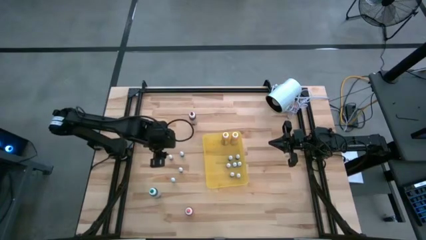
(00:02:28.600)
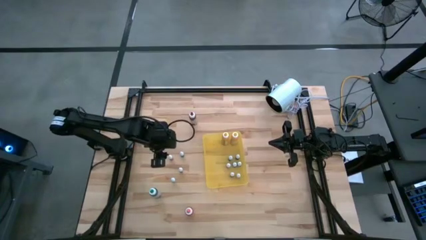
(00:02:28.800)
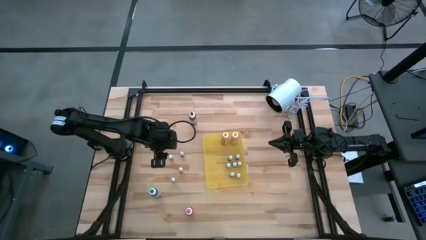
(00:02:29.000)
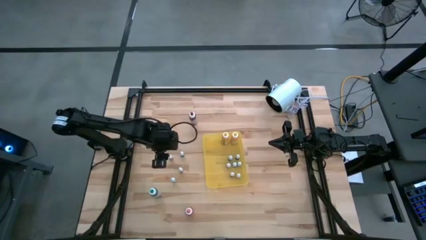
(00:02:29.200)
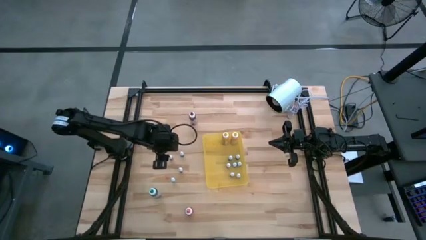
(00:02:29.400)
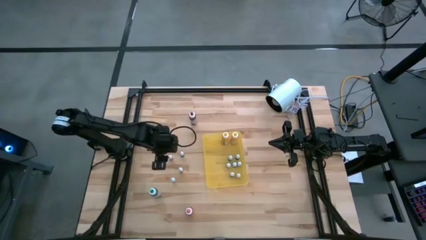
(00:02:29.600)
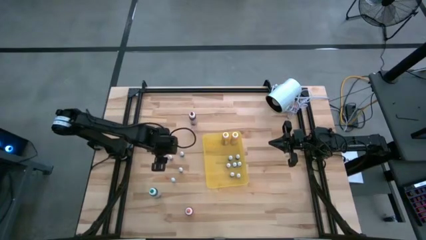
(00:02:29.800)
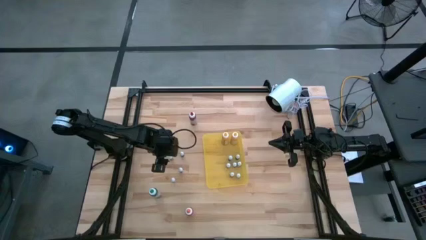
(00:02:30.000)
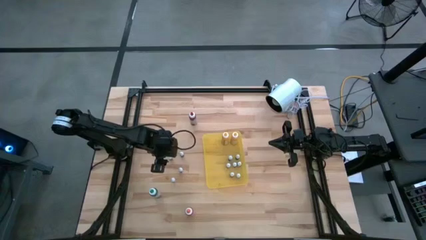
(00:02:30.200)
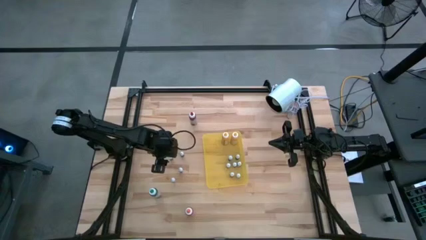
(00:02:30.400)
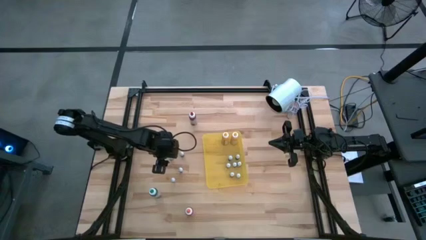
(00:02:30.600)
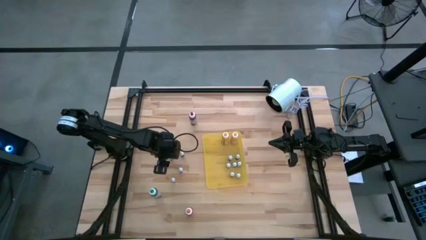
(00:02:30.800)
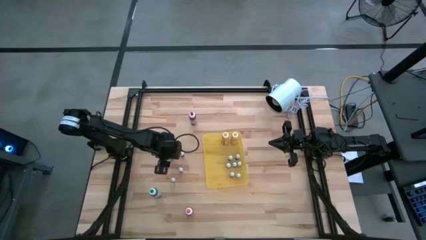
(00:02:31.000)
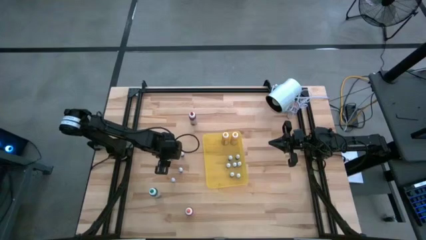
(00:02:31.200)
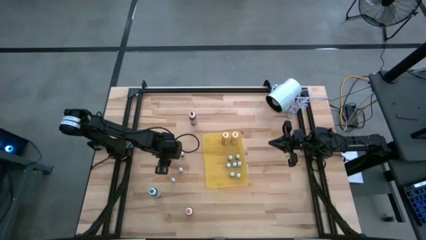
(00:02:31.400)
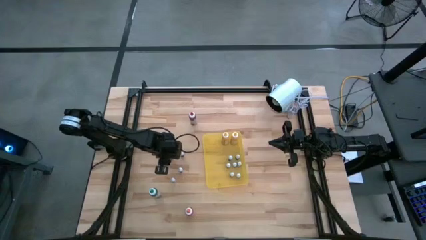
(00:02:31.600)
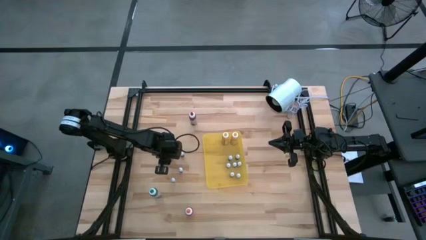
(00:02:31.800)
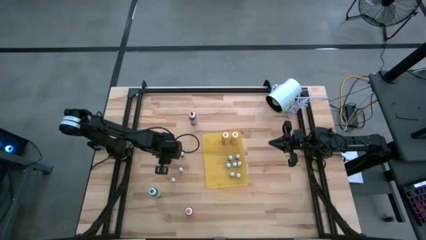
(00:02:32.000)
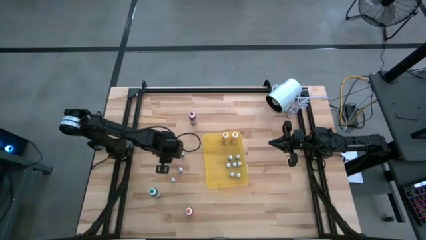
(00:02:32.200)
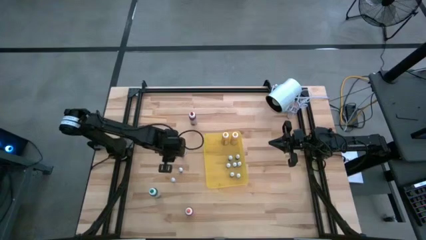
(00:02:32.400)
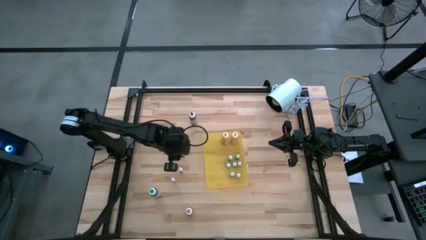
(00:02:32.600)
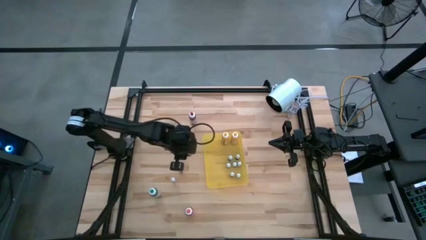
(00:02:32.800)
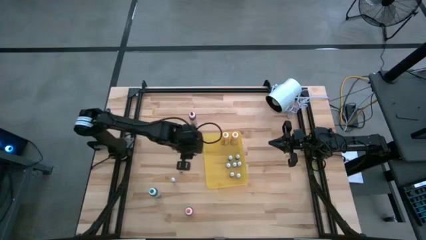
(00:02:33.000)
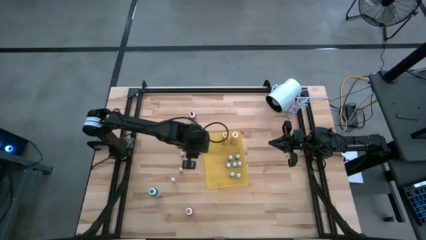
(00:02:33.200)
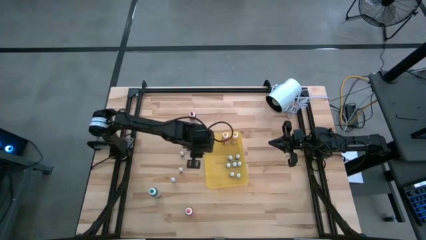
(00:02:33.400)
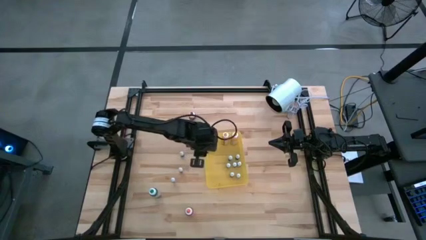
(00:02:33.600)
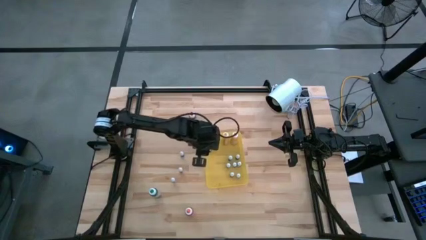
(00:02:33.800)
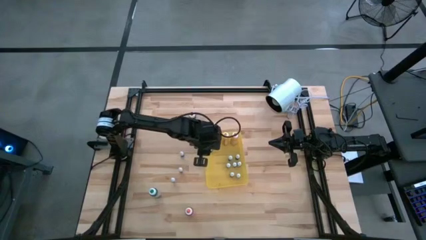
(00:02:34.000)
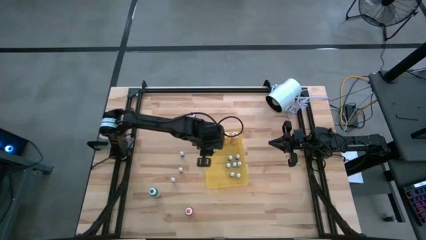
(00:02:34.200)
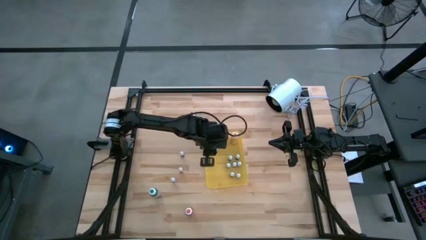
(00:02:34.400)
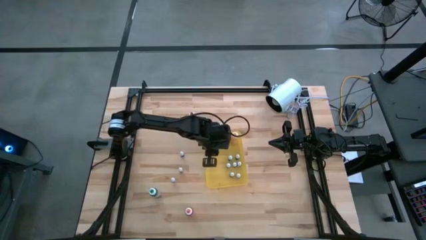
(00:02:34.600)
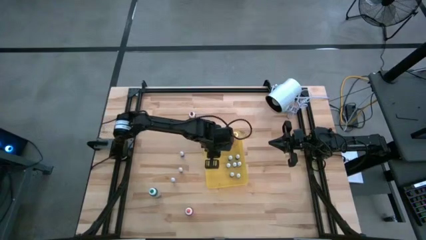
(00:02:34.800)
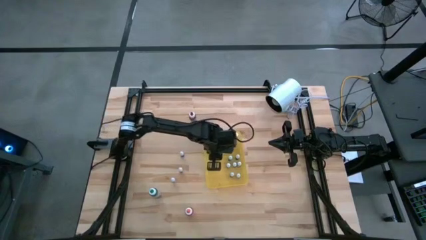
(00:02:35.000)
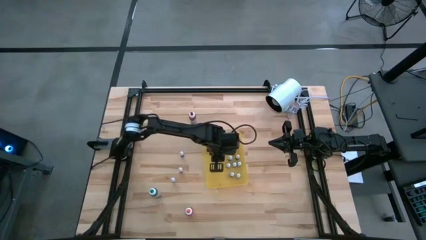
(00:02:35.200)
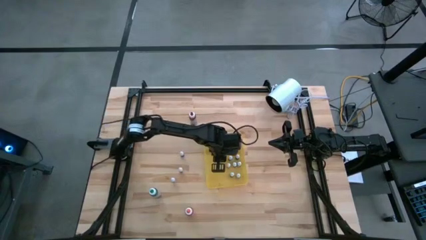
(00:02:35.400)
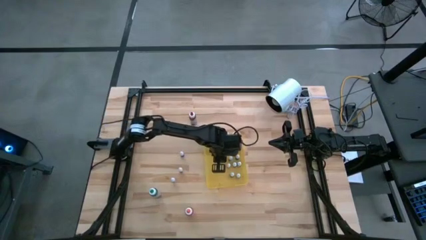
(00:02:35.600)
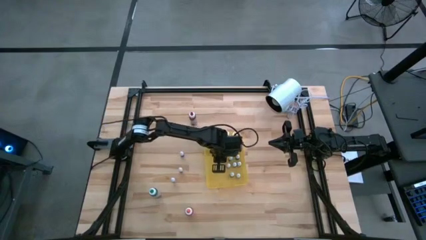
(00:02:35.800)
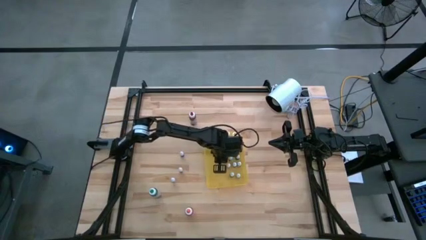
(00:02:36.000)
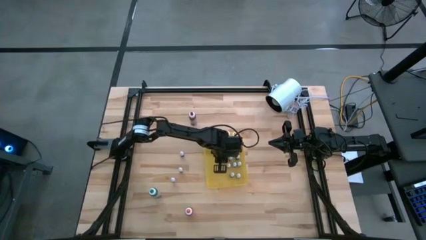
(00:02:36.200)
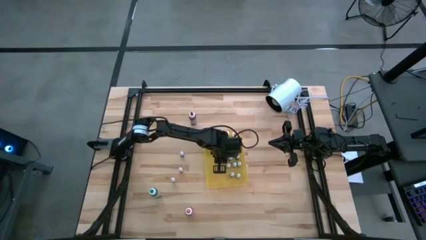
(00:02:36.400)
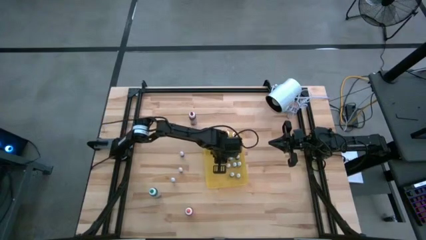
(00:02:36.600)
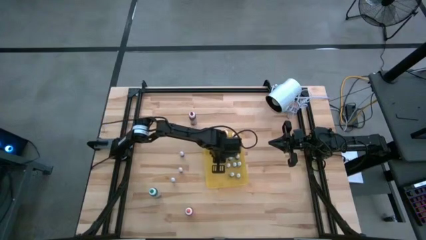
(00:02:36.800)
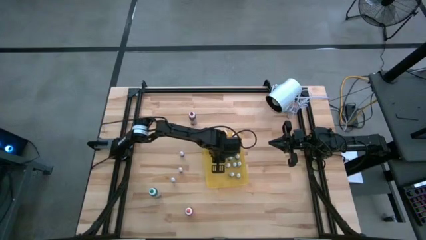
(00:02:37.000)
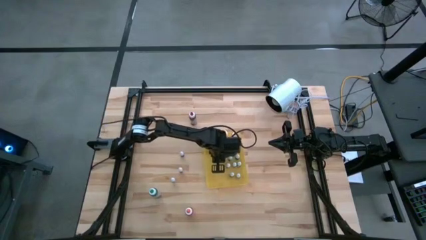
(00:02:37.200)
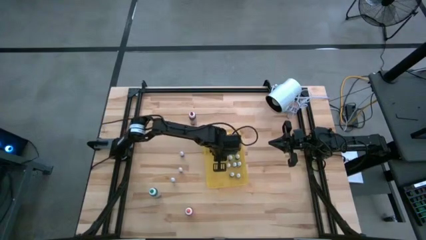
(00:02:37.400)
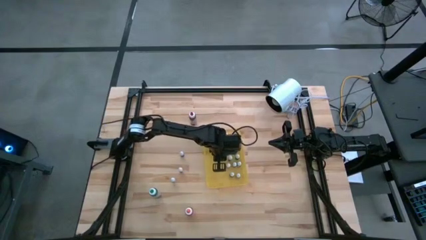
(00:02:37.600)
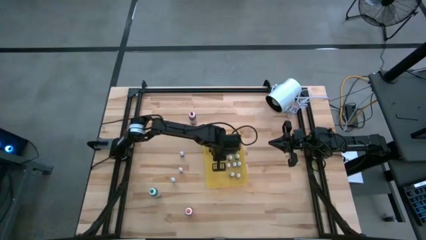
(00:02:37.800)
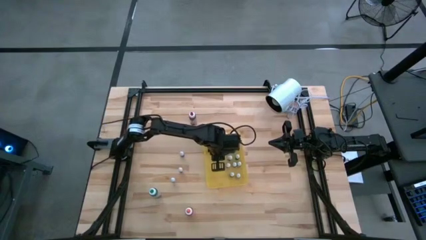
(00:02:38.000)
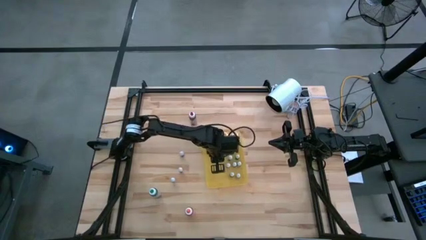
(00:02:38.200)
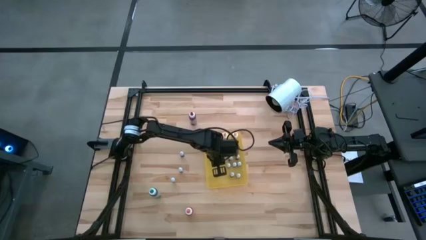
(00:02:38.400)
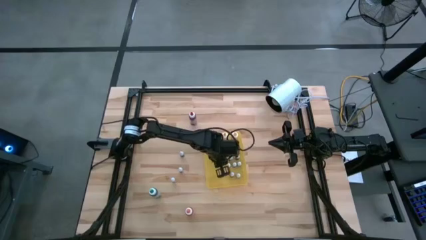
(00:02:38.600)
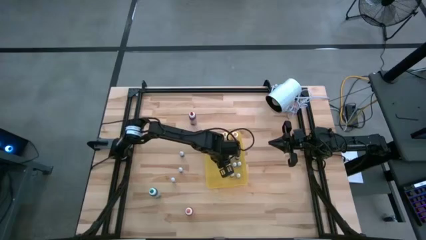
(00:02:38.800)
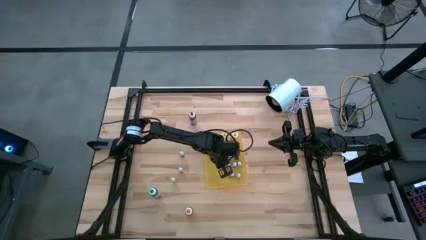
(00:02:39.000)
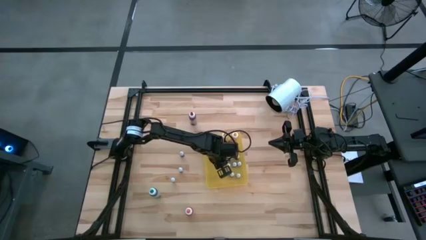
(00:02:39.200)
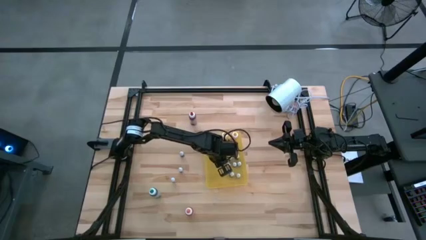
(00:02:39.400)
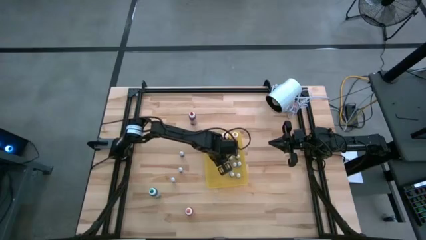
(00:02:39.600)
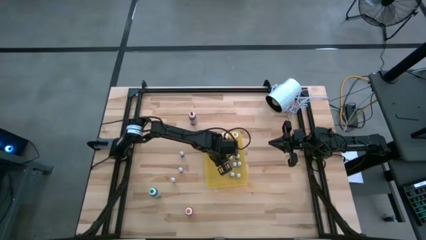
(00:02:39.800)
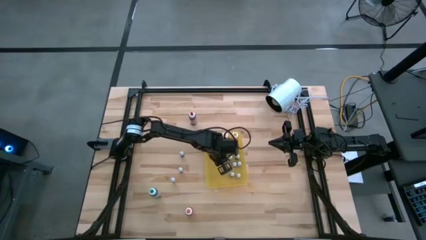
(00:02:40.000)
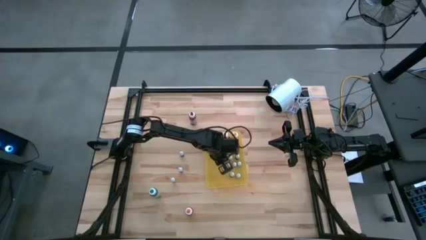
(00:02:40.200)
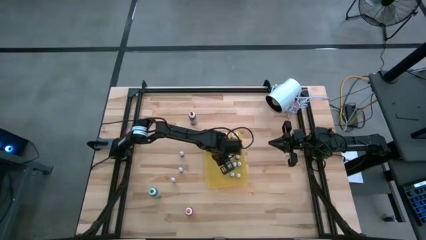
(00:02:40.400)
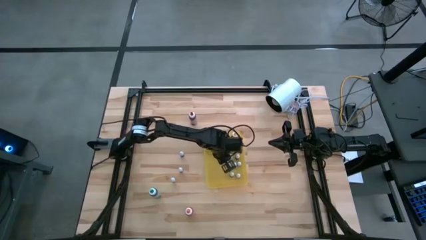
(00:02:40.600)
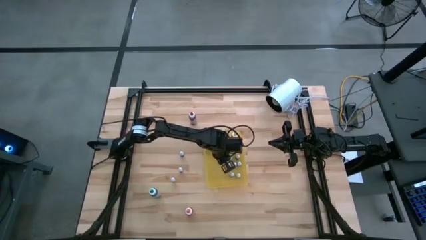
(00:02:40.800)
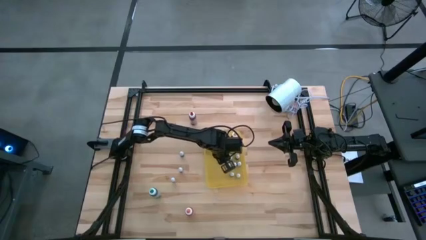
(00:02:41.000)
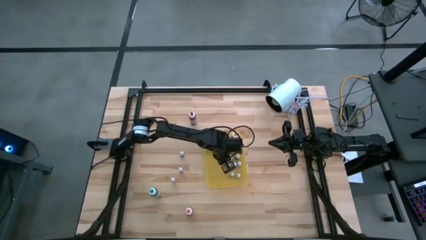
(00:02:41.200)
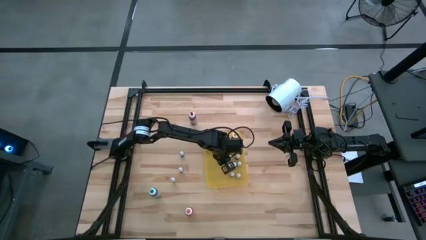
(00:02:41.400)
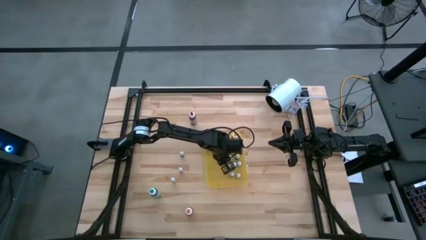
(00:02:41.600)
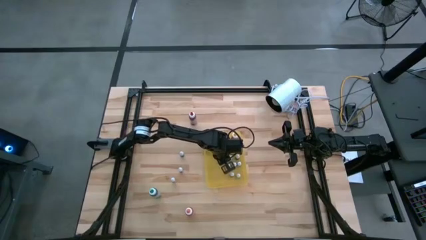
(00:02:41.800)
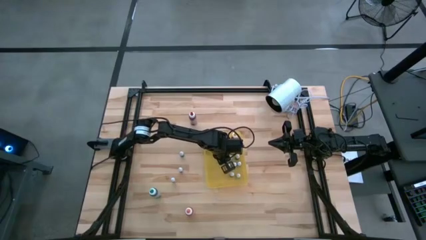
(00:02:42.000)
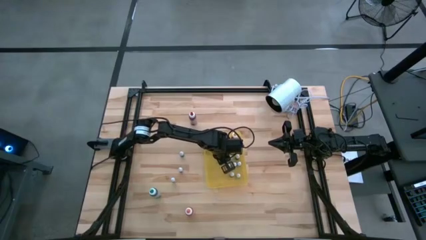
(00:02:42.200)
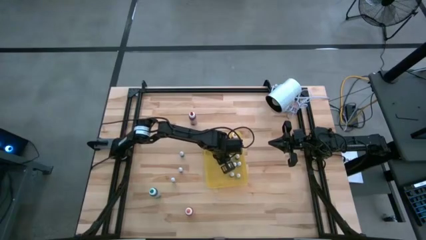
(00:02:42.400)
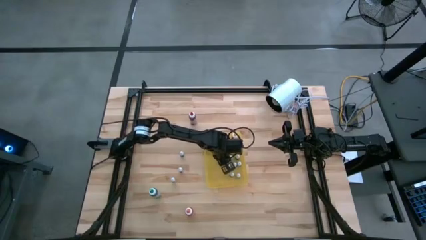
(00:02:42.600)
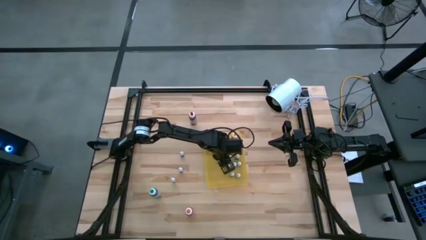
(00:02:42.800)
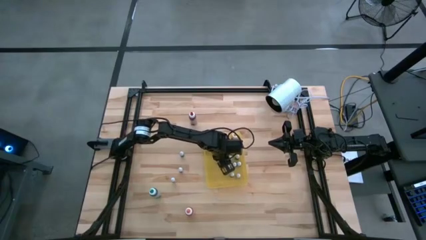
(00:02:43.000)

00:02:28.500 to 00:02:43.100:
Task: Pick & Place food coloring
Put the small orange food coloring bottle into the yellow bin
